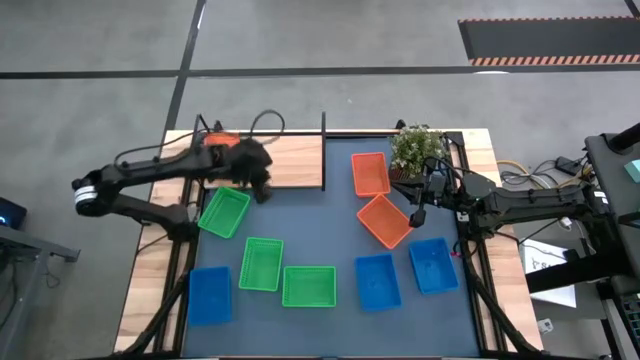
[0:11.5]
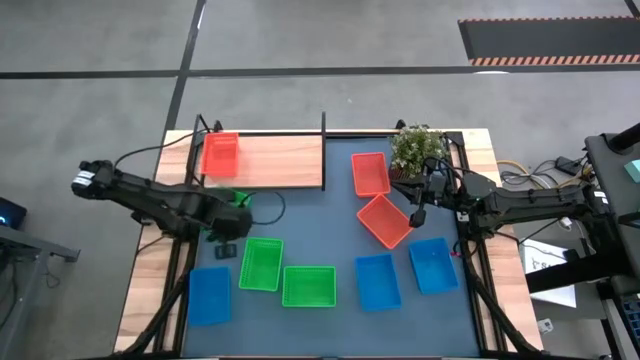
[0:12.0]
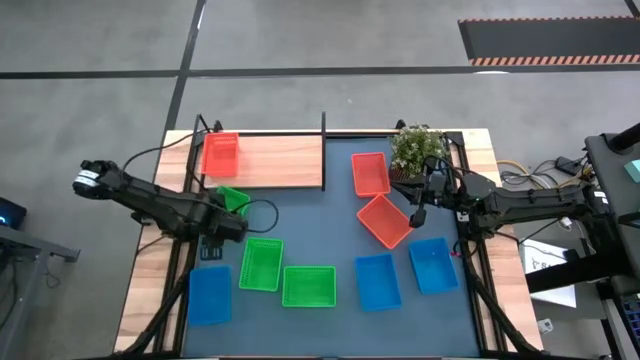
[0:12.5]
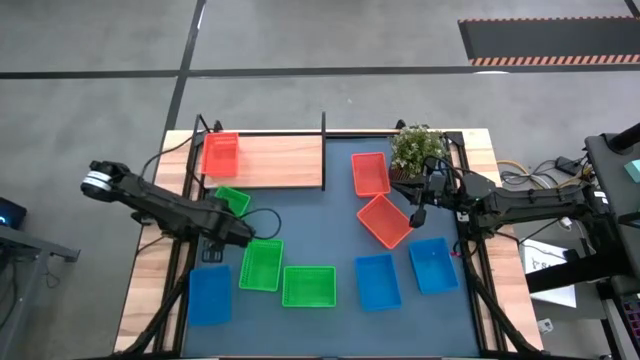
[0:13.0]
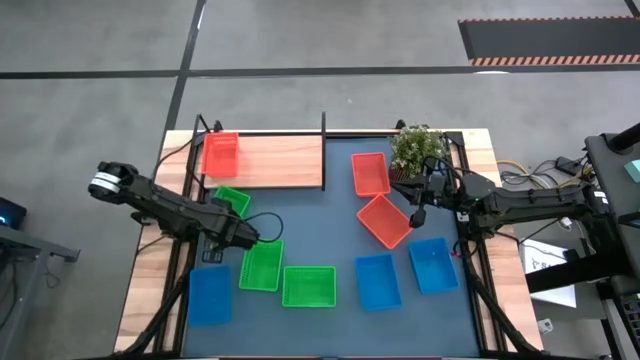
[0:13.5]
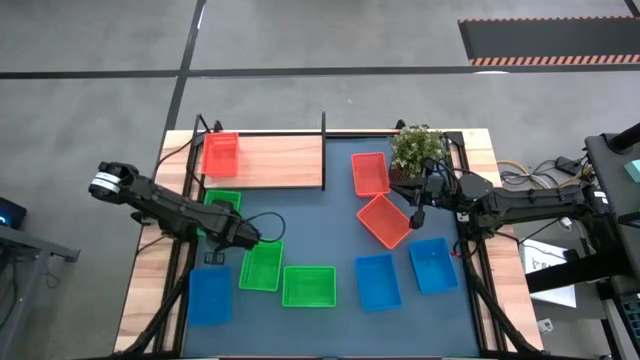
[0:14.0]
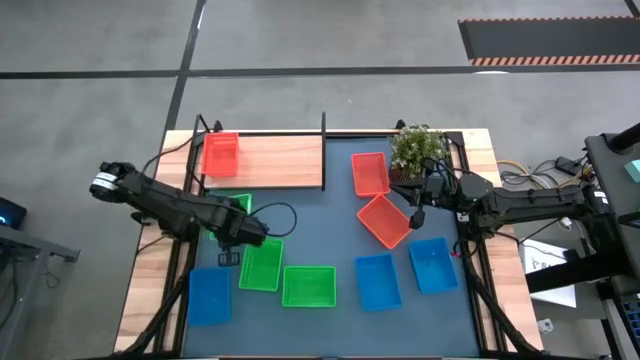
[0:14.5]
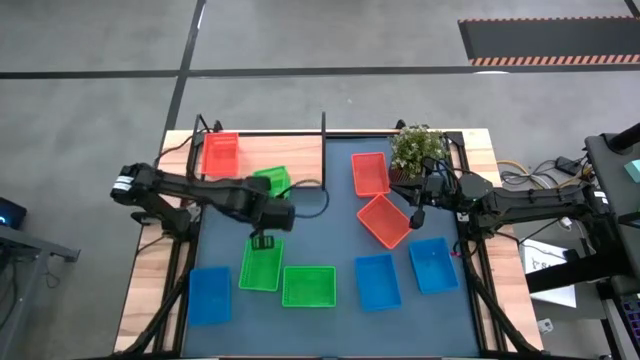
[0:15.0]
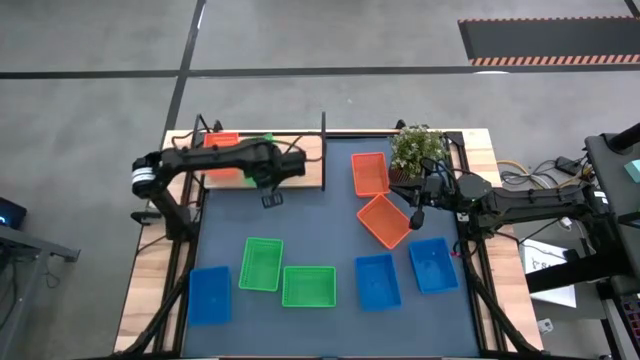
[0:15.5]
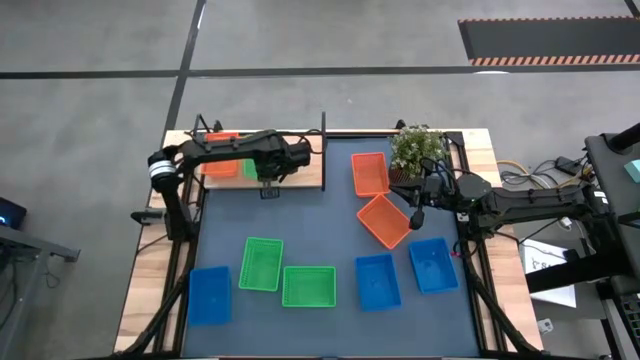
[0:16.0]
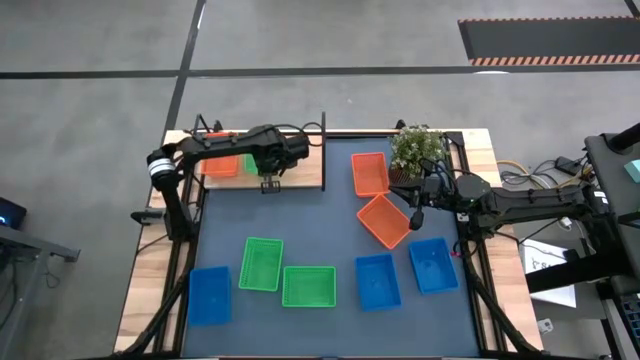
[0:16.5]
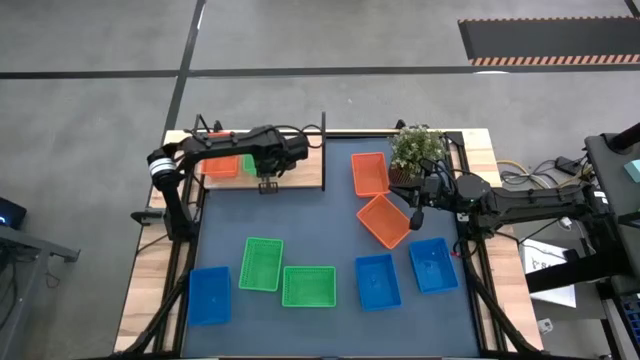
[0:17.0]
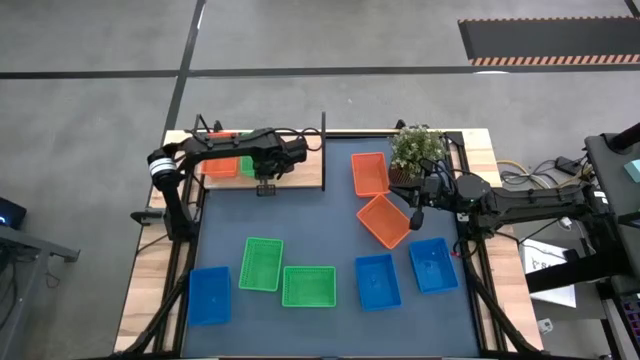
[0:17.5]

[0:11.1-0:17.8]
Task: Stack baskets on shelf by color
Put the top green bin on the shelf

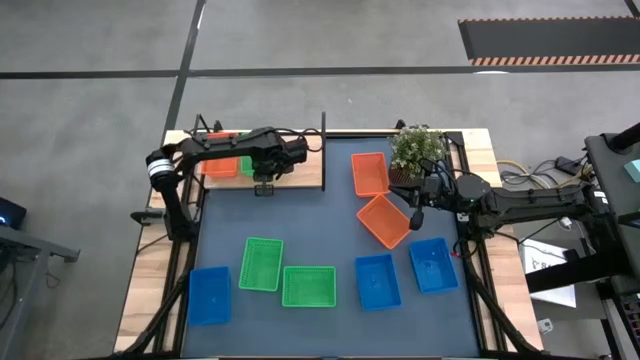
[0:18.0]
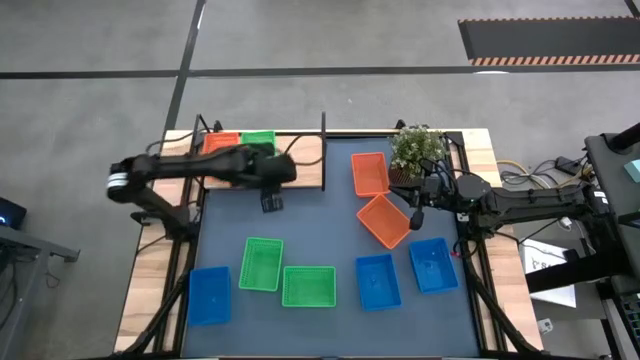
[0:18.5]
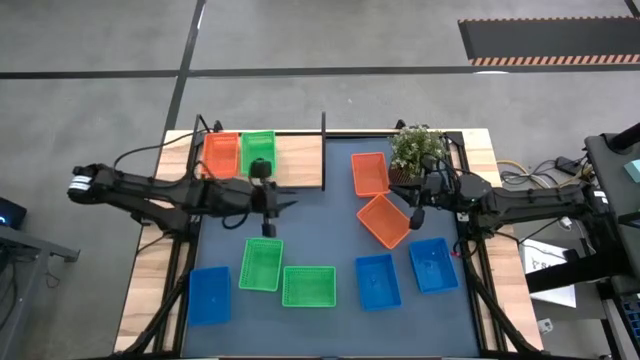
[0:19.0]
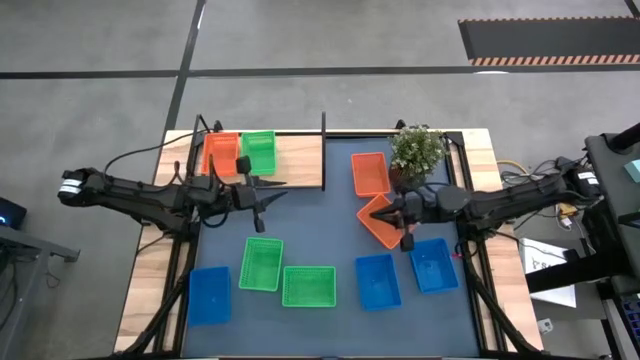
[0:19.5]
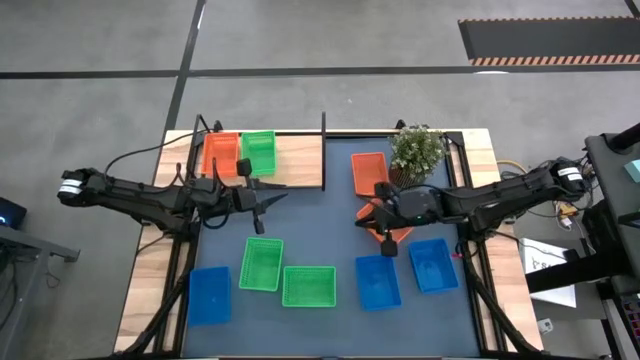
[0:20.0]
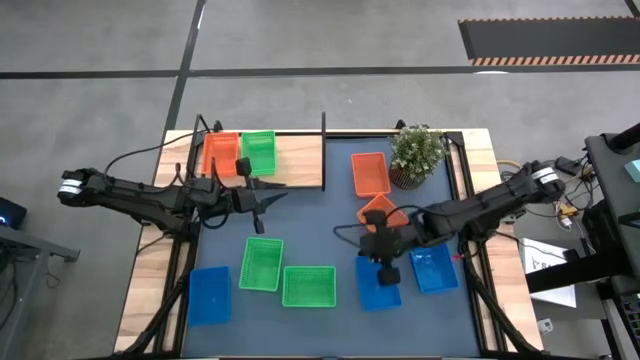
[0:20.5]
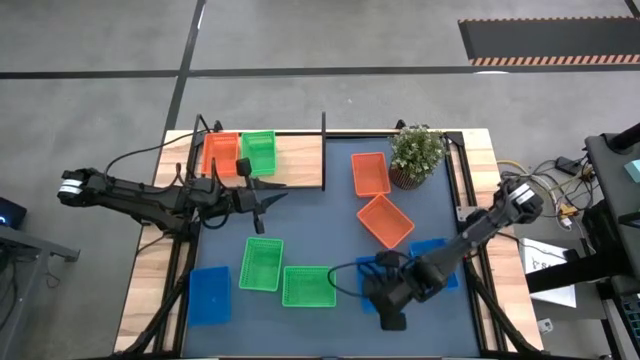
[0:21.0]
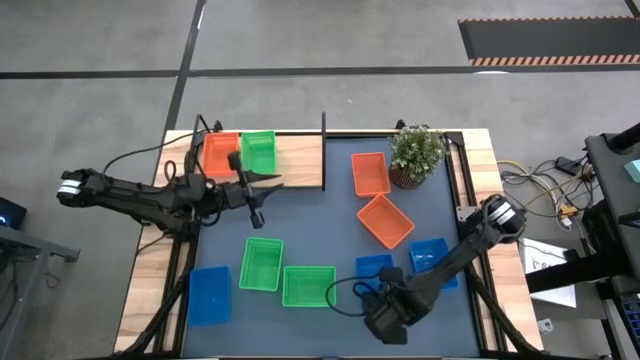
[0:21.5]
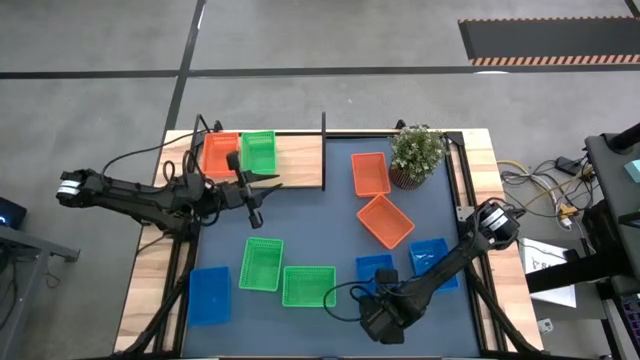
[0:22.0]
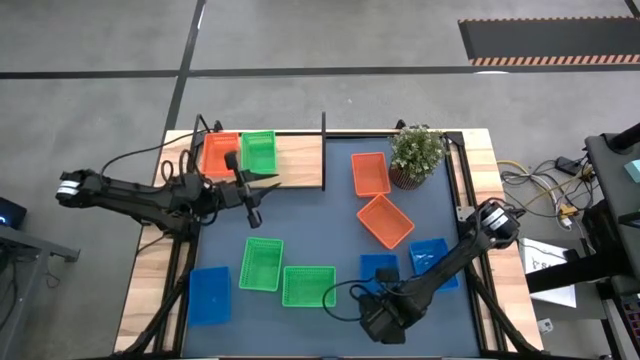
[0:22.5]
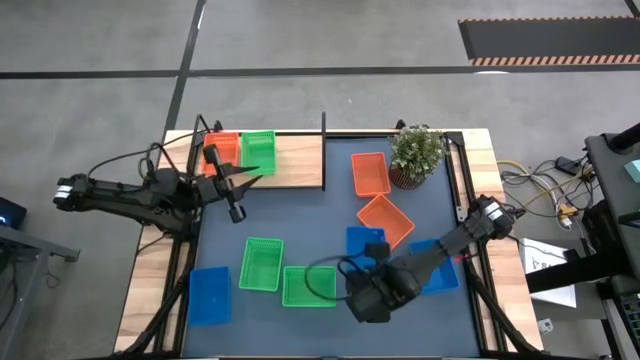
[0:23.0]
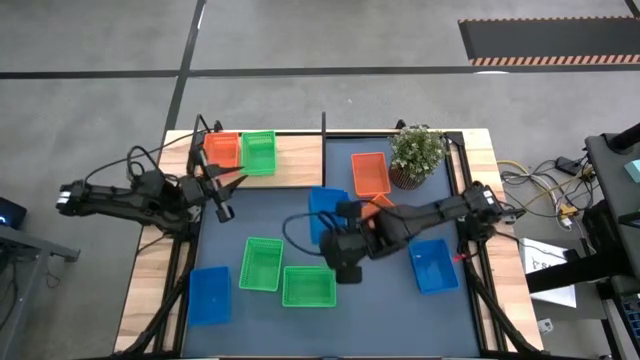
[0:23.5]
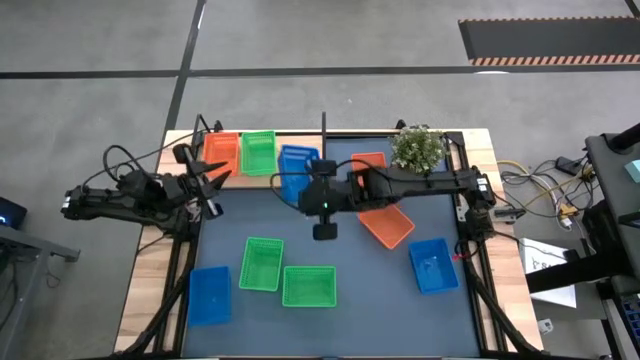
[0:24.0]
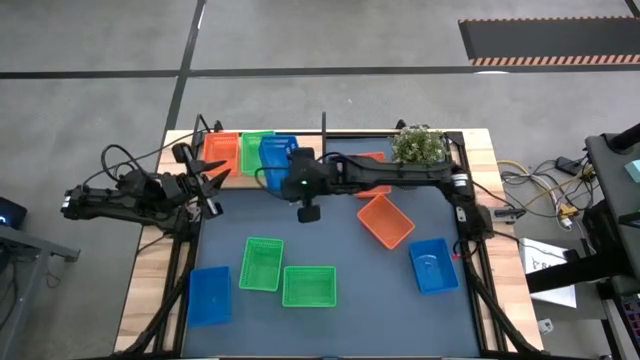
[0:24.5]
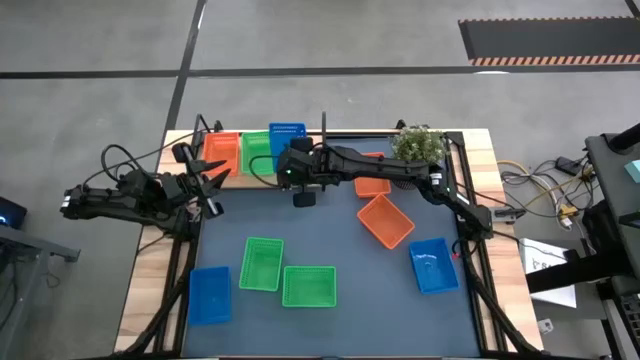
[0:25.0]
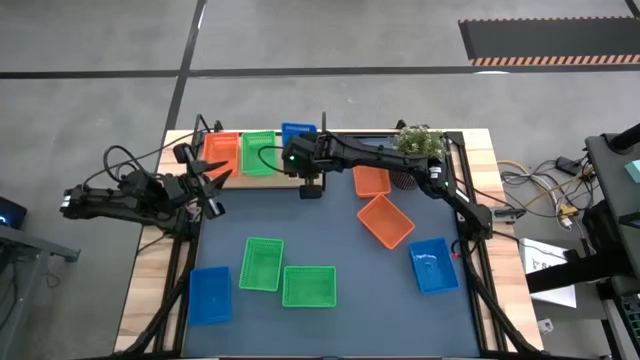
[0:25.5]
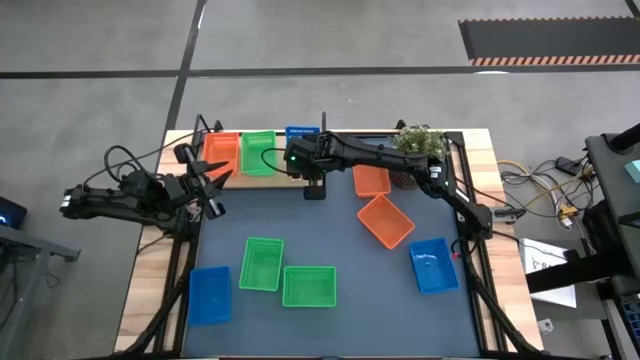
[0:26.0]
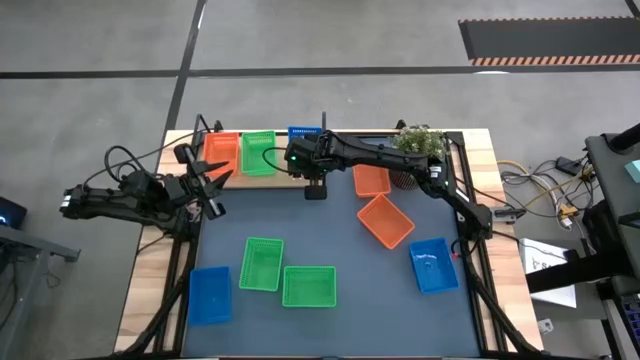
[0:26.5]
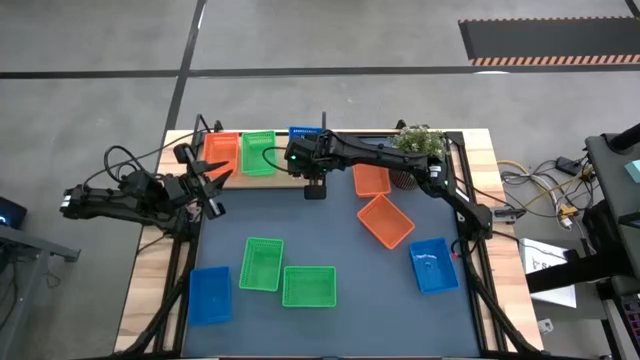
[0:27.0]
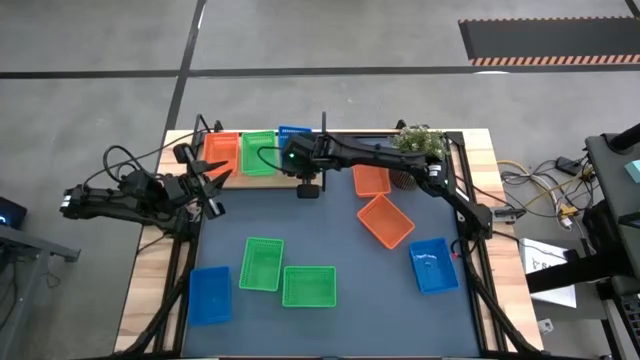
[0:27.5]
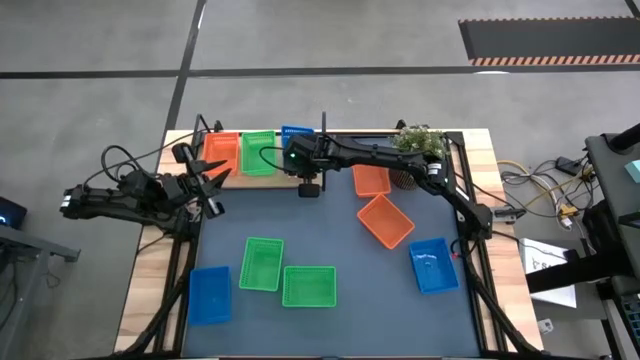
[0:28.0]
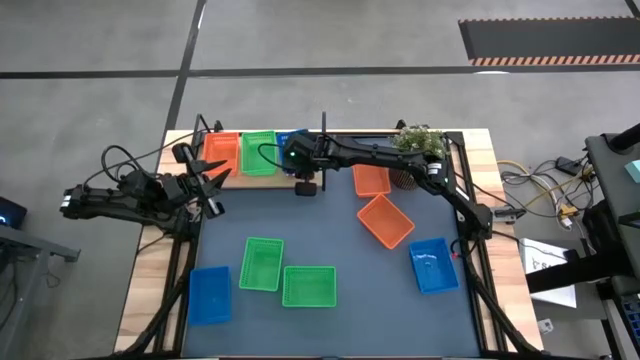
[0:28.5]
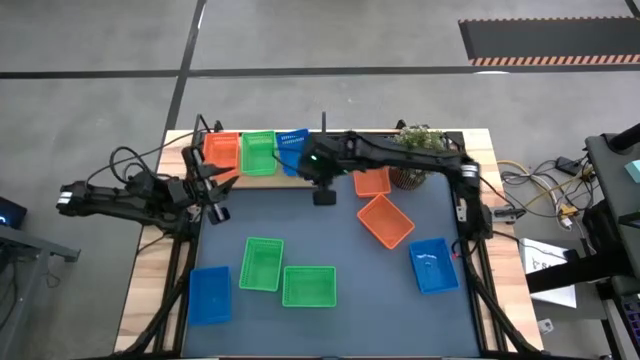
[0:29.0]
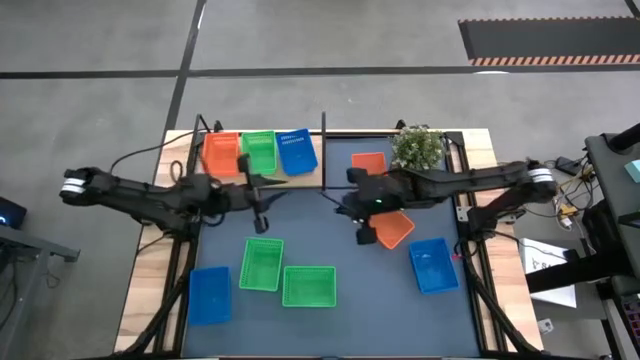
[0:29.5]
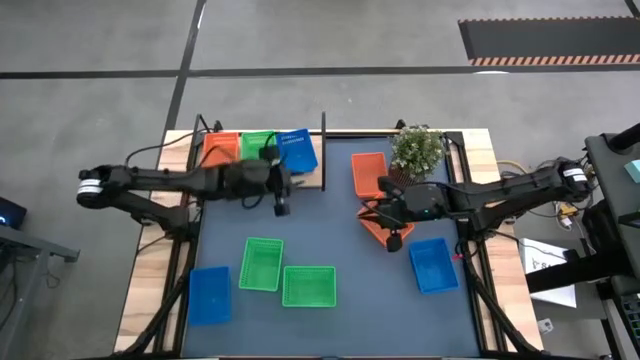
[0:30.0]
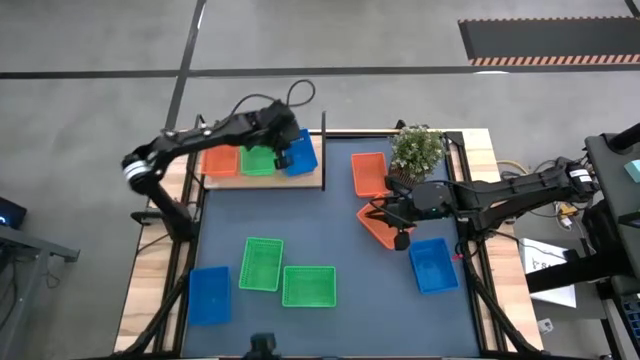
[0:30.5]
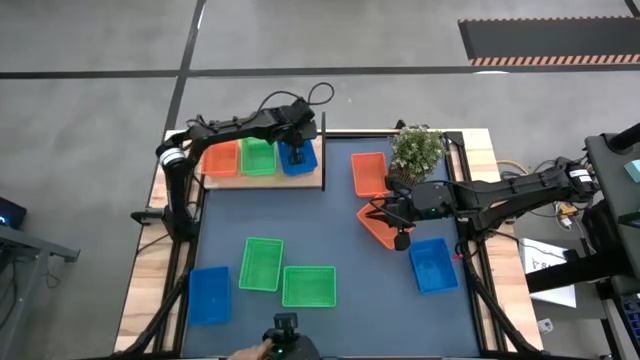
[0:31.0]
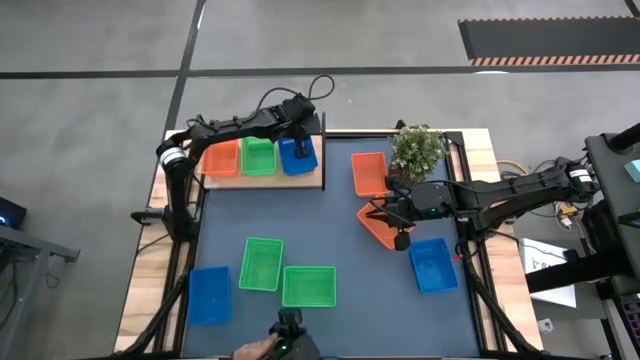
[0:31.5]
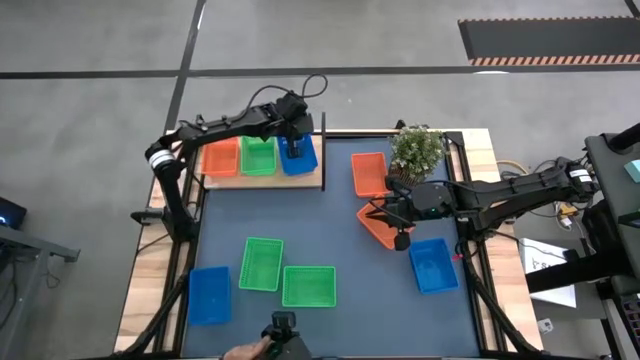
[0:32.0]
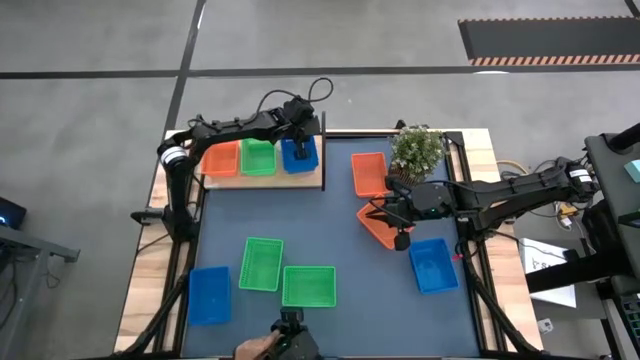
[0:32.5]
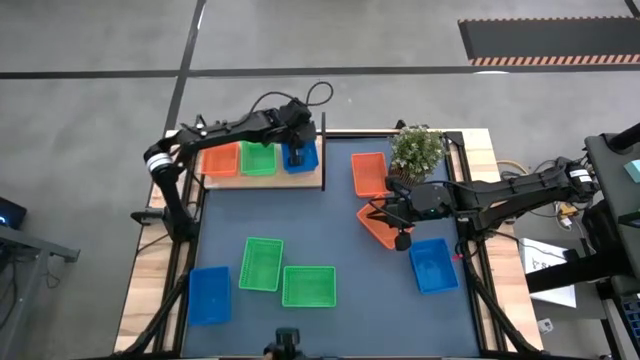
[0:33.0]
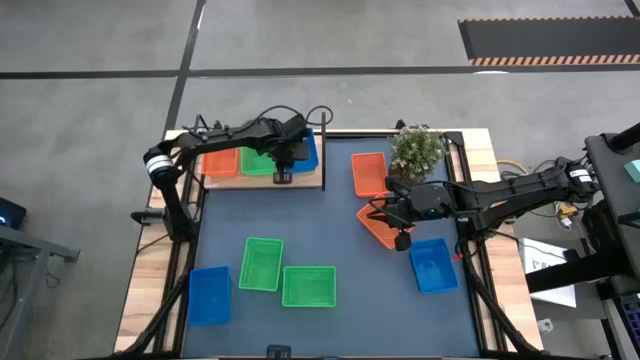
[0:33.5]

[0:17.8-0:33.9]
Put the middle blue bin on the shelf
